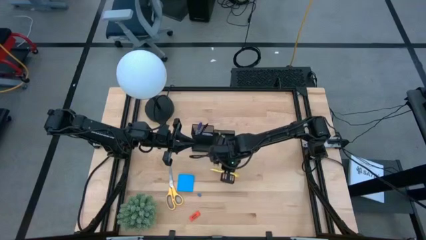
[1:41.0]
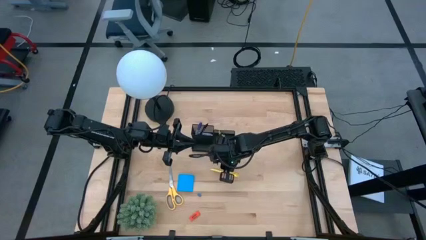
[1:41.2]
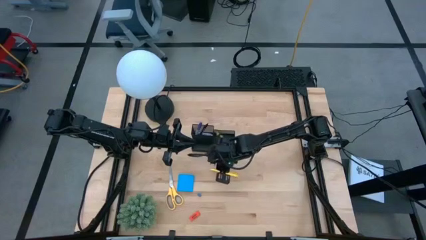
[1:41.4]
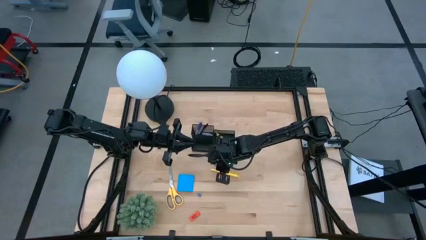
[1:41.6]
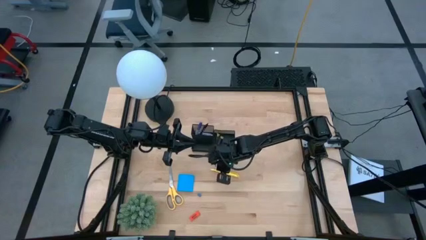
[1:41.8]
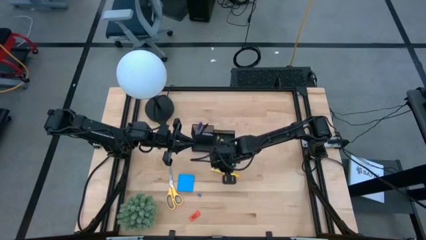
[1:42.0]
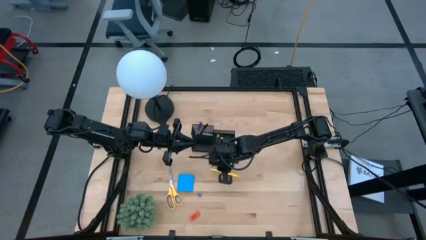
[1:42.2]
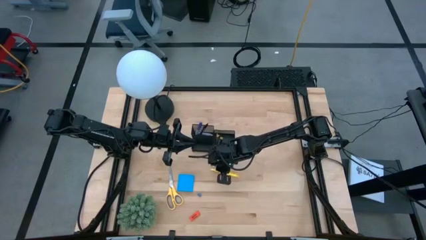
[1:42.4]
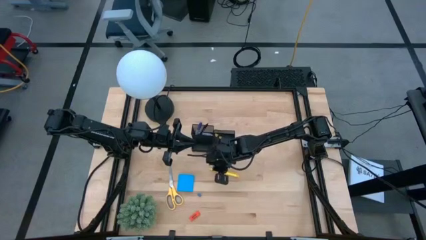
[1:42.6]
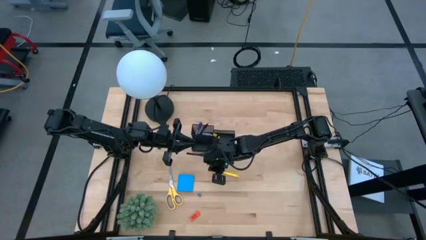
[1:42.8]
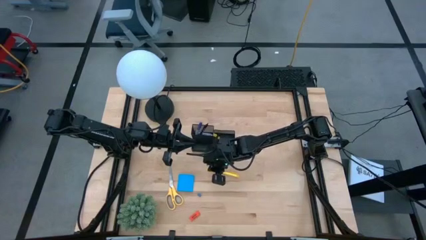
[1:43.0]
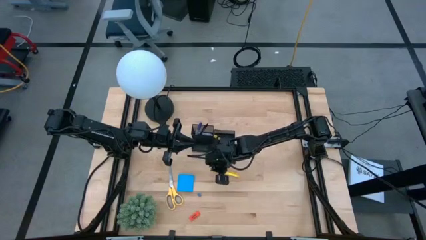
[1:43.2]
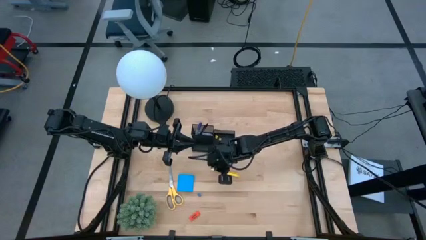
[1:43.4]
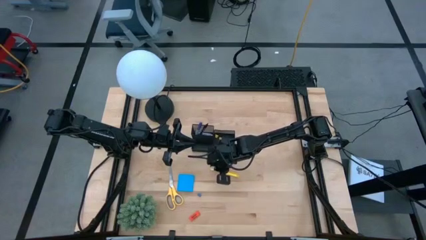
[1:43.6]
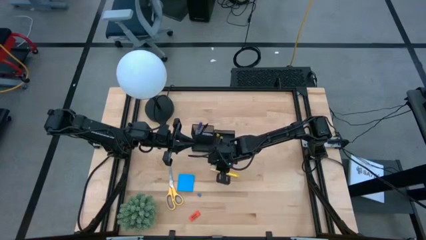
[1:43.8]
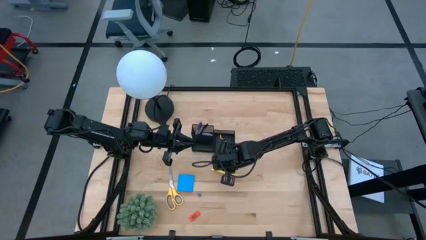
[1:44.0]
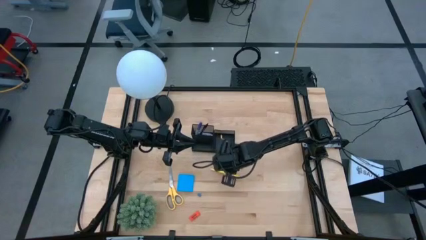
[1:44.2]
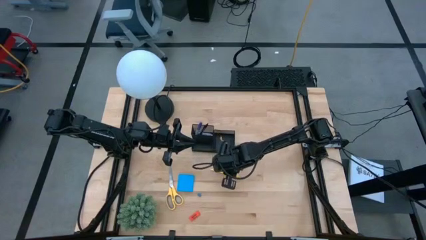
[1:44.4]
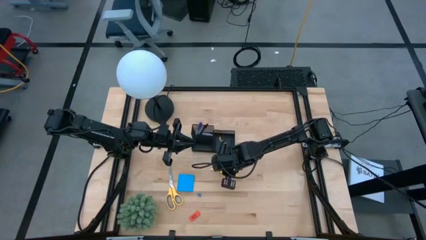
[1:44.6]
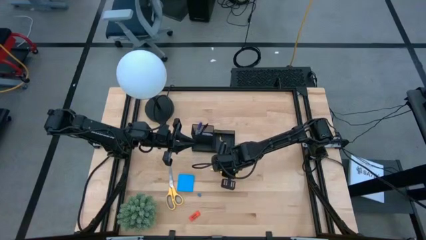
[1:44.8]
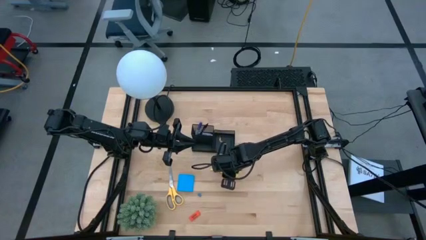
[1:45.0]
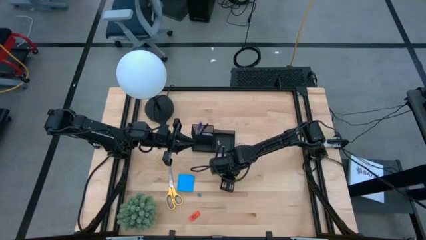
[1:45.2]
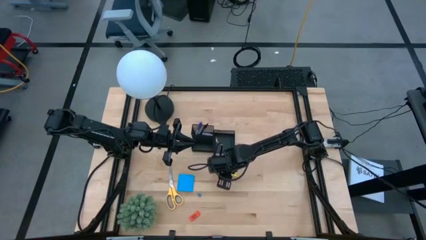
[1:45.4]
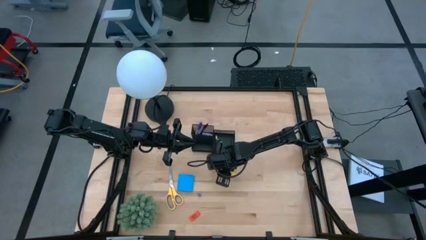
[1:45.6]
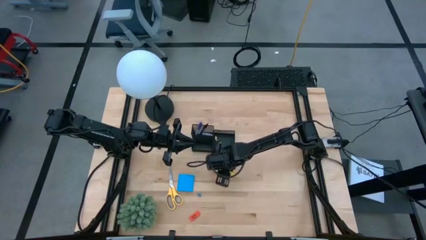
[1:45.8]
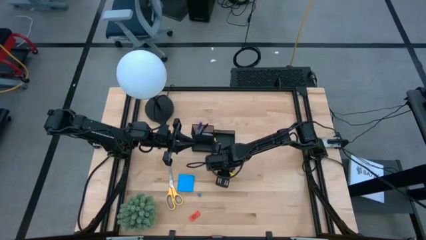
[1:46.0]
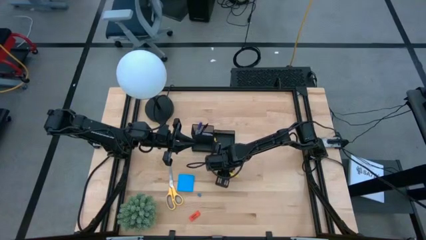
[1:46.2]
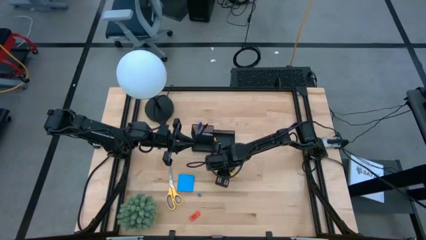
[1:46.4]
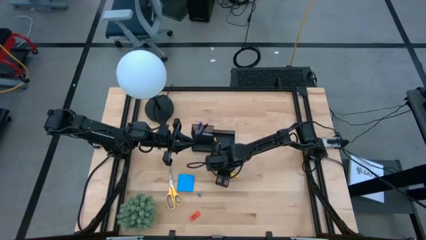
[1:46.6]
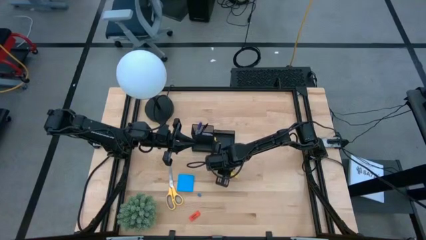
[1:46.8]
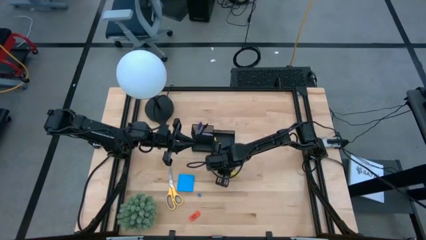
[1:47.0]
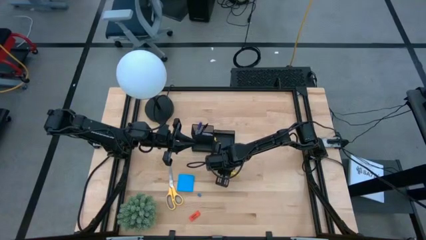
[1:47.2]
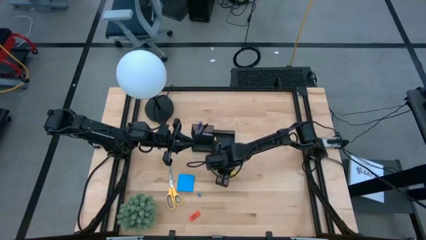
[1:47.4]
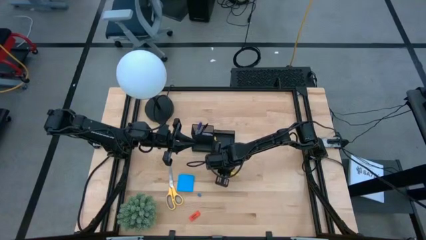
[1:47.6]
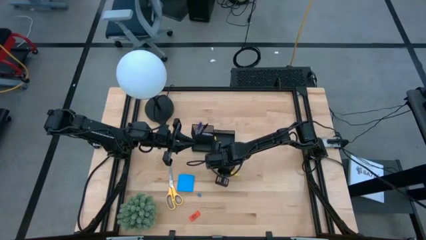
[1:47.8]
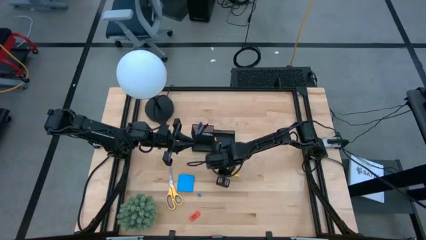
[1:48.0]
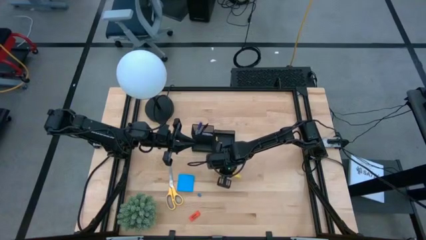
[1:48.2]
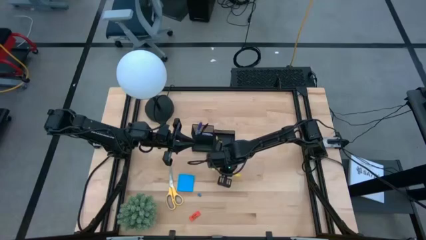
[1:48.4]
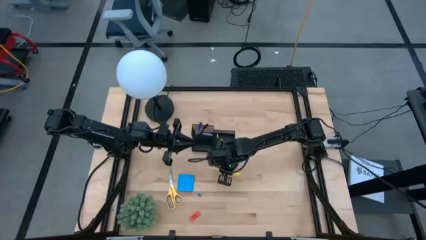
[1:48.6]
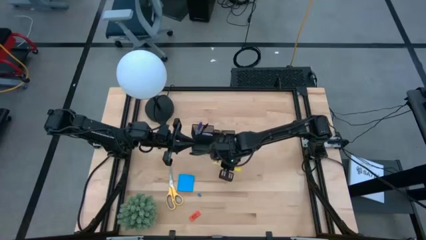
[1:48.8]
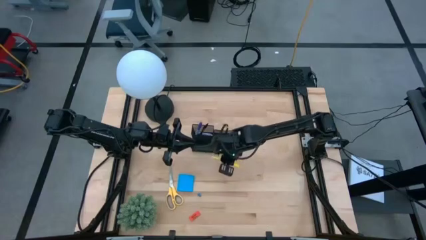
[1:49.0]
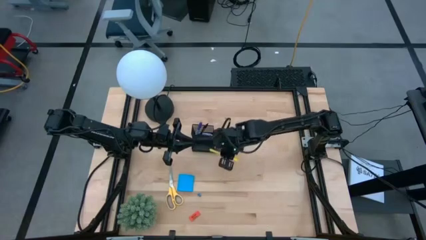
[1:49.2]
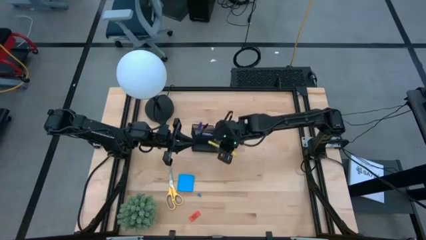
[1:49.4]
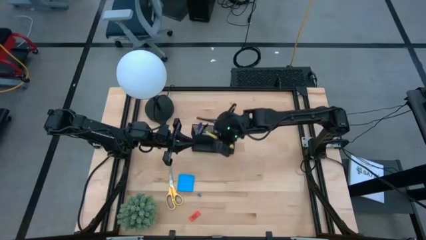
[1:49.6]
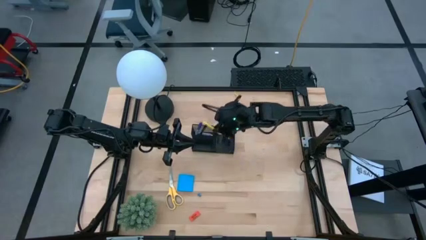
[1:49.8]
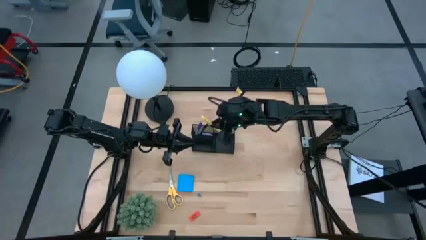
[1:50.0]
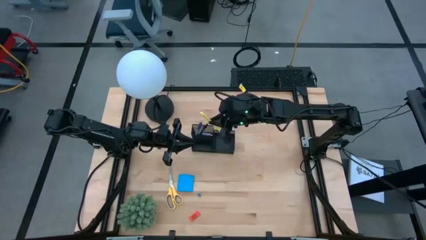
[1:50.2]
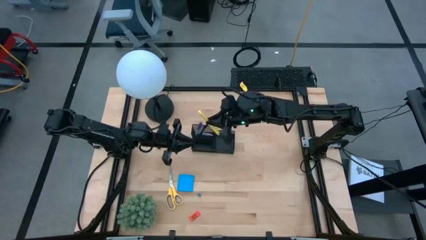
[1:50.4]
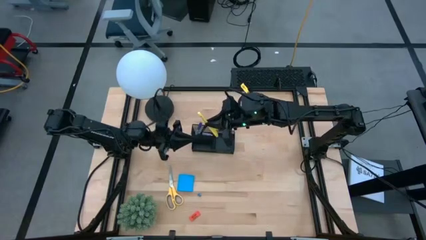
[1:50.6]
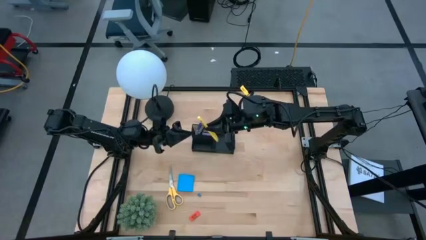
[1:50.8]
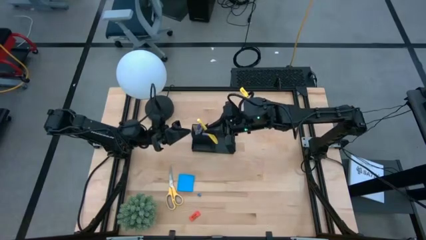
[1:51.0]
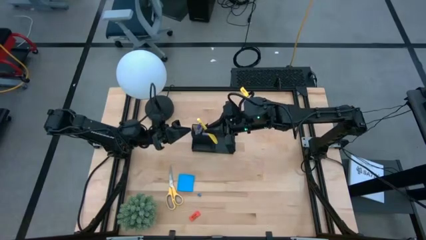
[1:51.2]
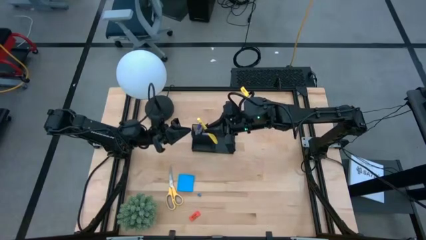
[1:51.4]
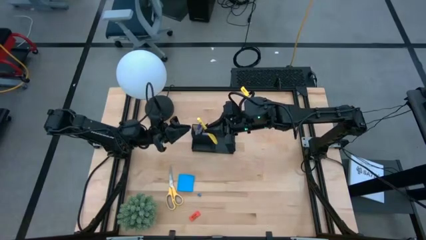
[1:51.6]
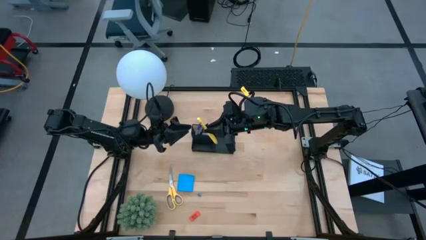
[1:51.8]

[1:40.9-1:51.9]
Task: Pick and place office supplies into organizer
Put the yellow pen into the black desk organizer

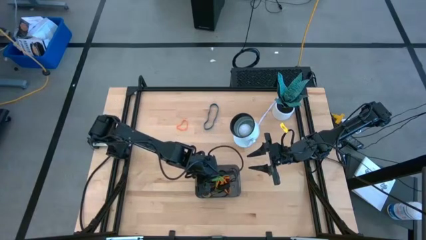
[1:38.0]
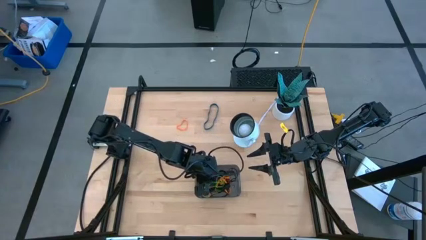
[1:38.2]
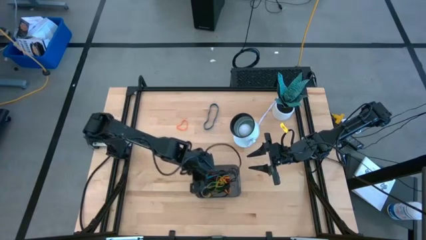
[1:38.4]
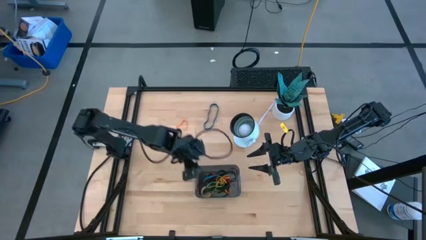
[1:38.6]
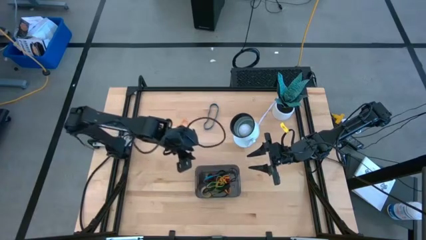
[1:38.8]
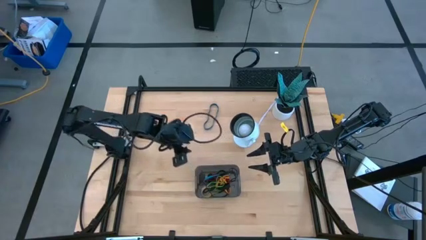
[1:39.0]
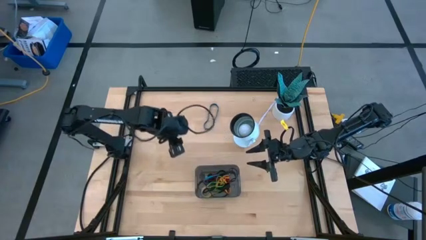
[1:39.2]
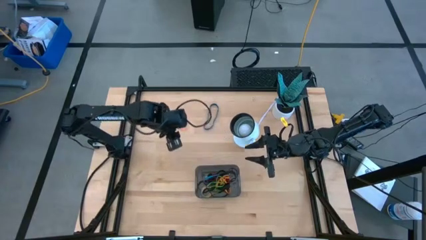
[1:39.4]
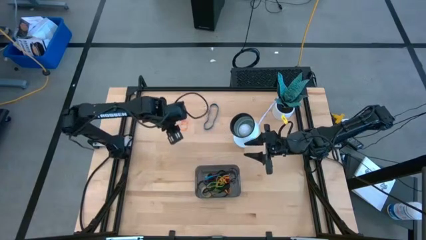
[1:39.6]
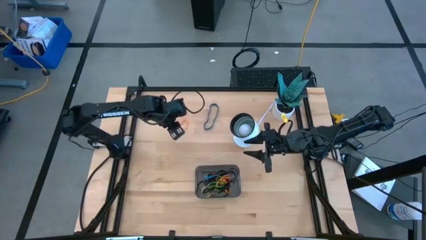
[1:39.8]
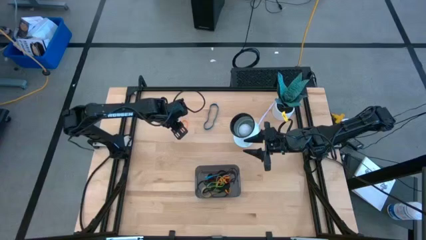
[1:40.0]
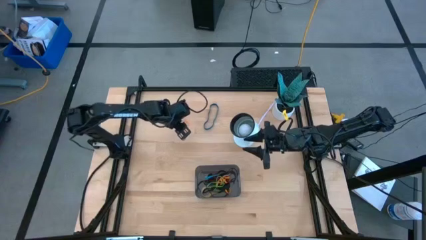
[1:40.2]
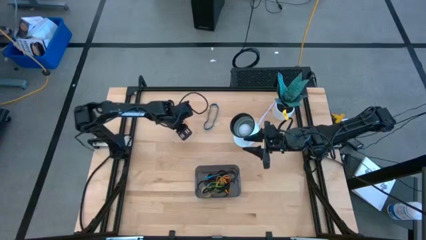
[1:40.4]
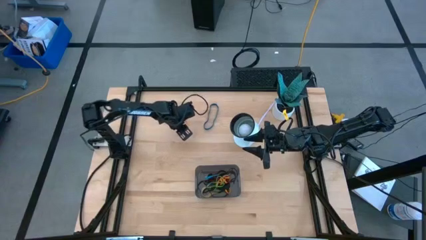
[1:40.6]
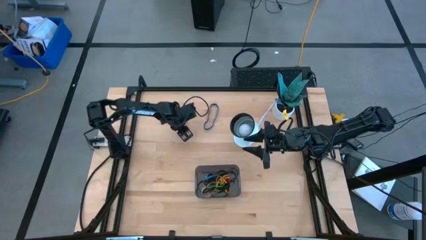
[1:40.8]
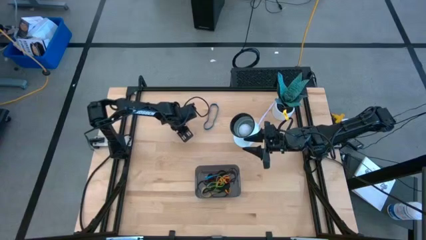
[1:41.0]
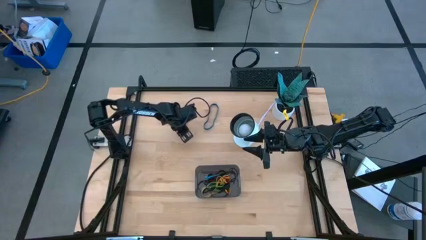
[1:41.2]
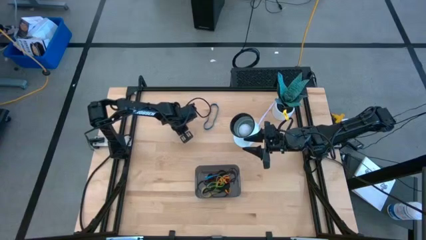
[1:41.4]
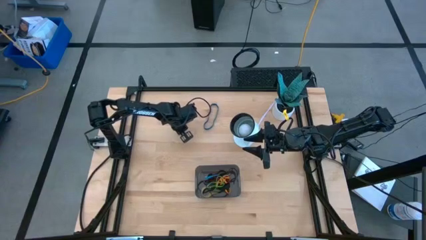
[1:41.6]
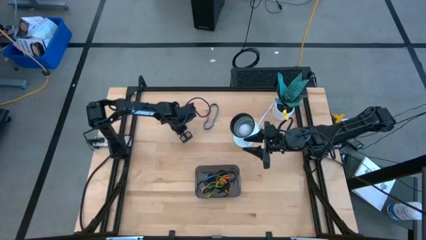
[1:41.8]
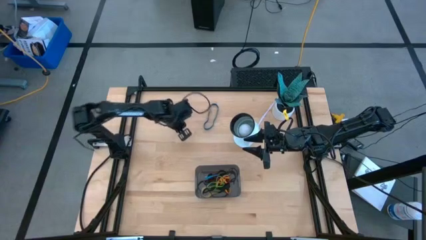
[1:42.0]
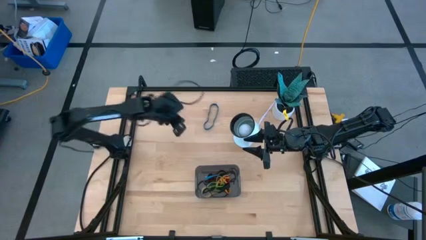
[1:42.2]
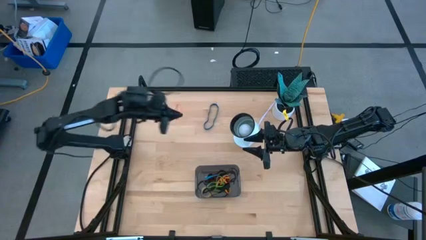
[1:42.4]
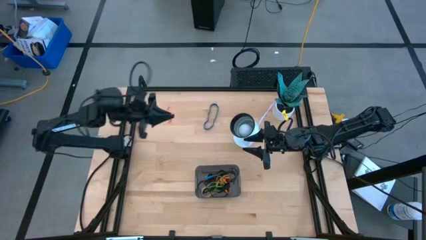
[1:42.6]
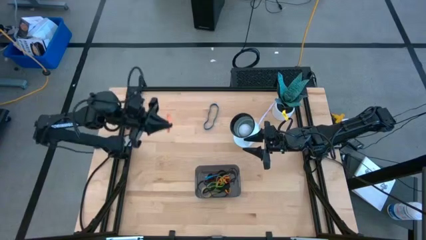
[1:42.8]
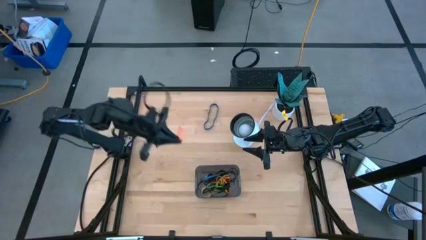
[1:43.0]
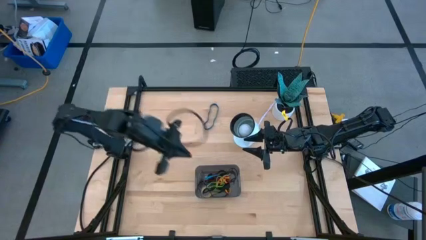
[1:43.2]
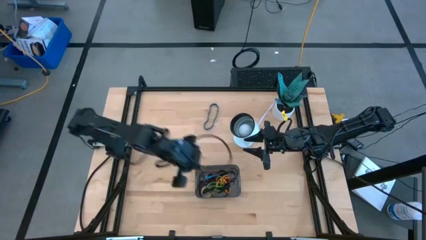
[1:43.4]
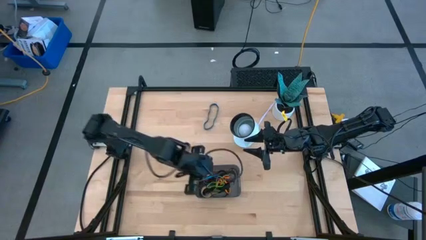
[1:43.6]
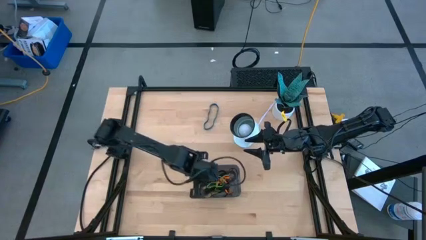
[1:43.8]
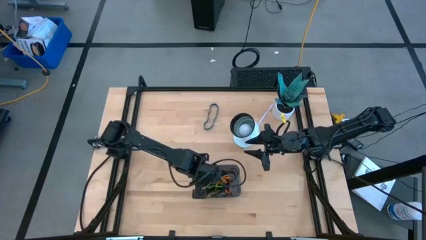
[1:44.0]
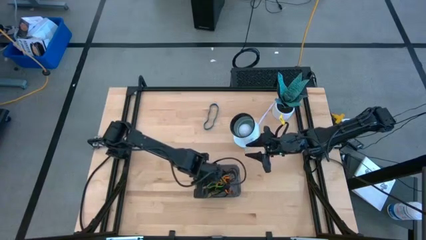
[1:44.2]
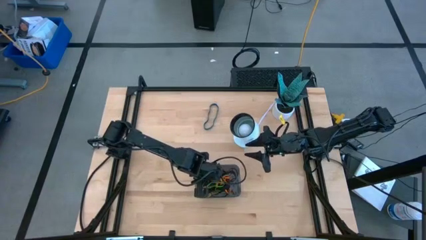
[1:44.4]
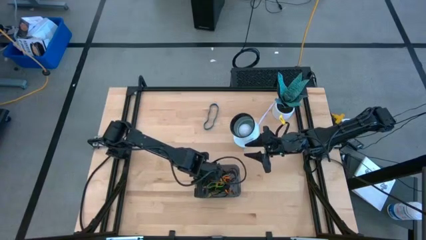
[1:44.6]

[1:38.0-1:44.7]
Task: Pick and place rubber bands into bin
Put the orange rubber band into the black bin
